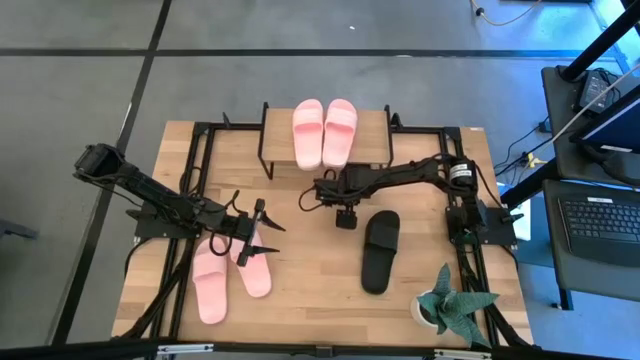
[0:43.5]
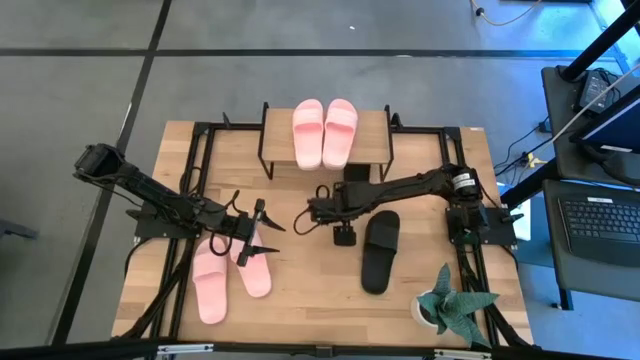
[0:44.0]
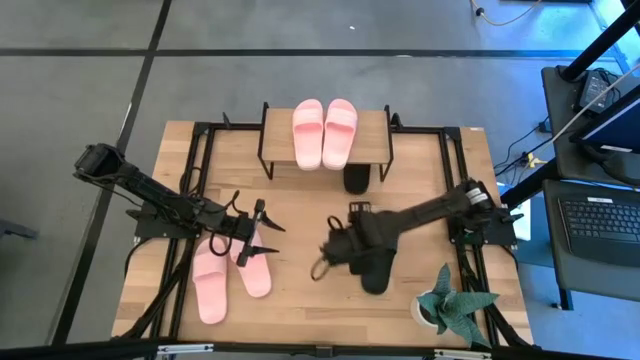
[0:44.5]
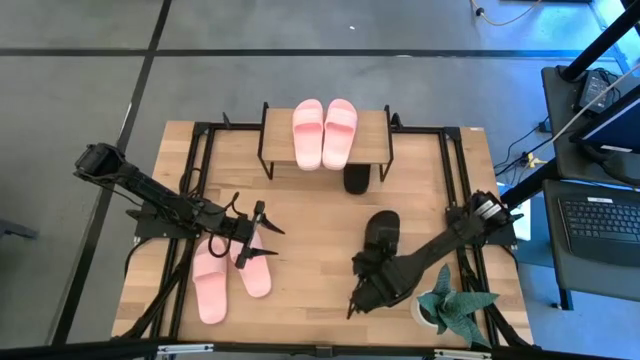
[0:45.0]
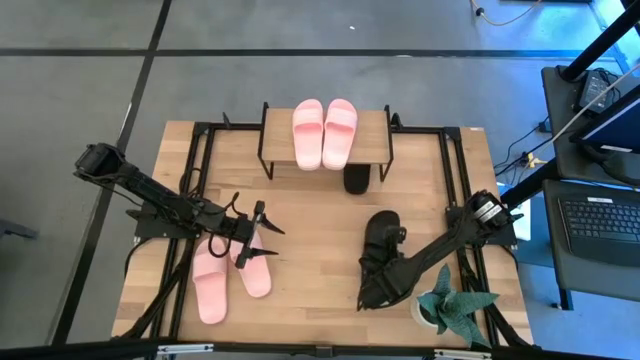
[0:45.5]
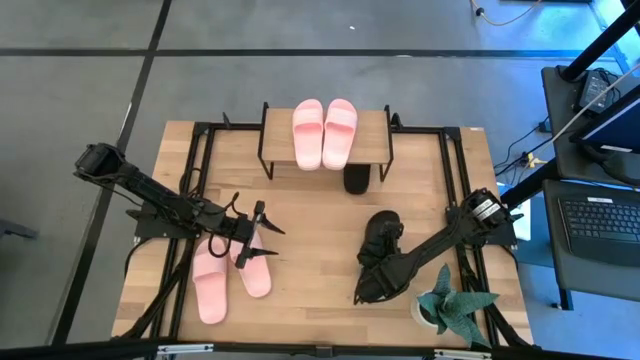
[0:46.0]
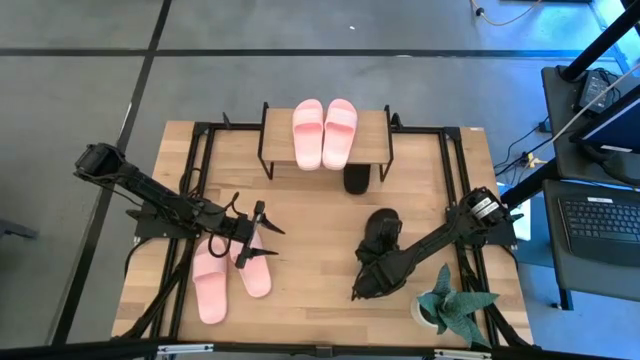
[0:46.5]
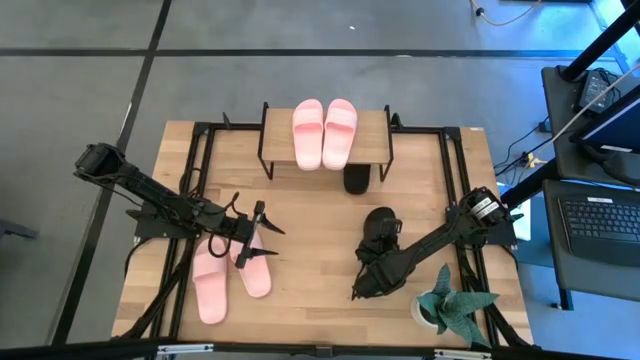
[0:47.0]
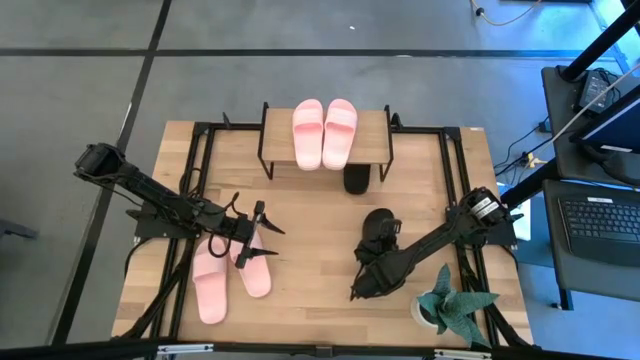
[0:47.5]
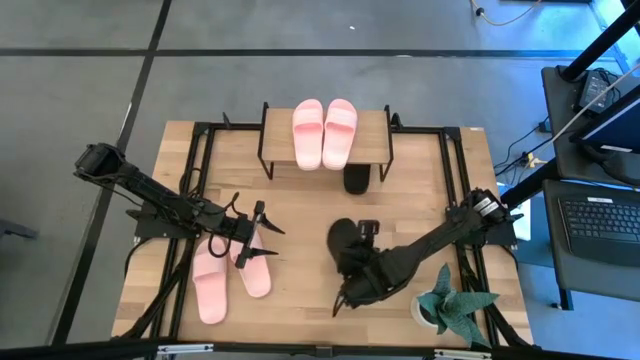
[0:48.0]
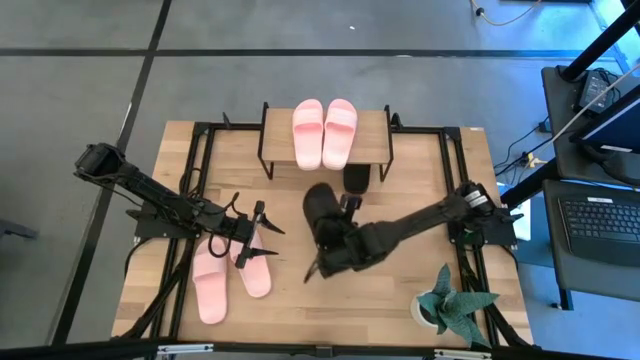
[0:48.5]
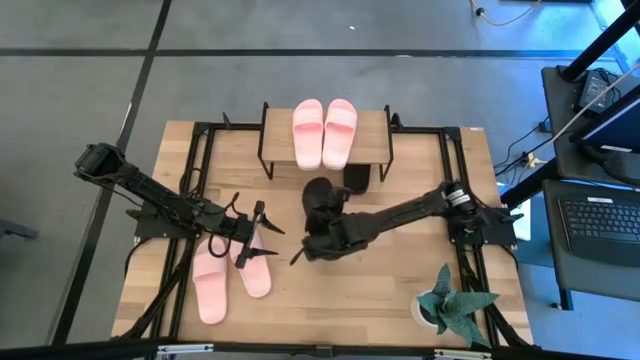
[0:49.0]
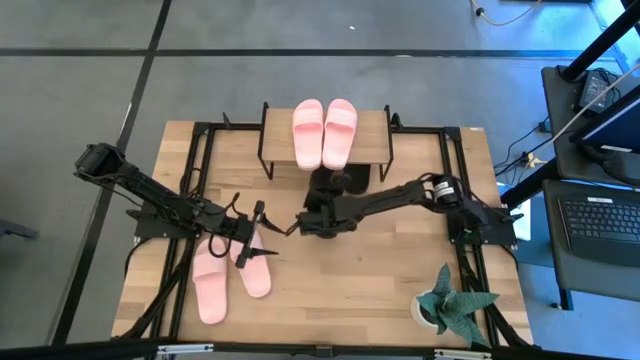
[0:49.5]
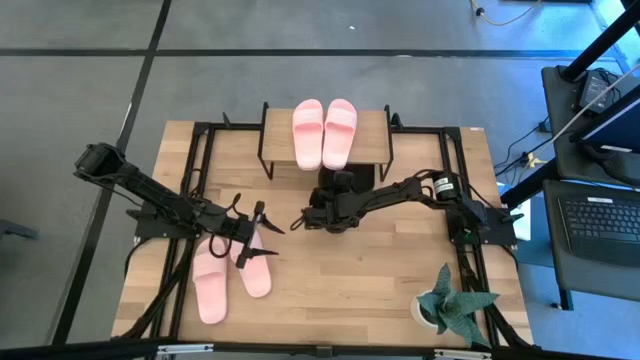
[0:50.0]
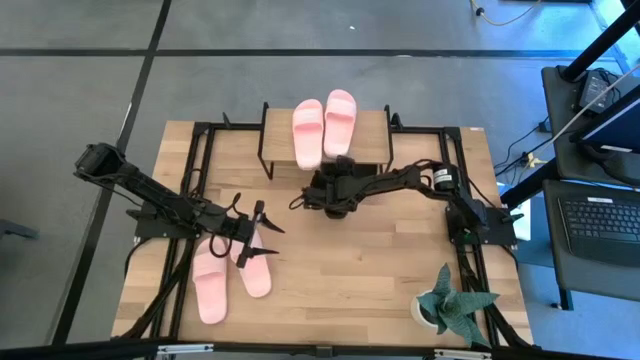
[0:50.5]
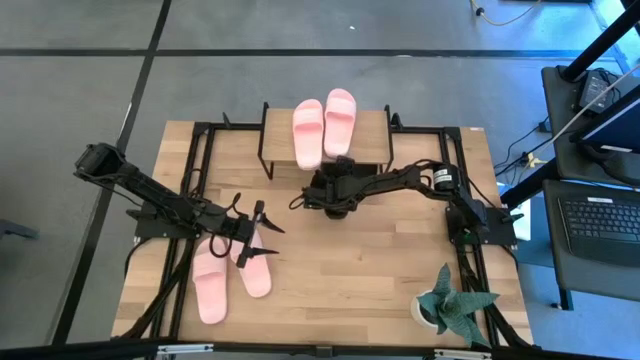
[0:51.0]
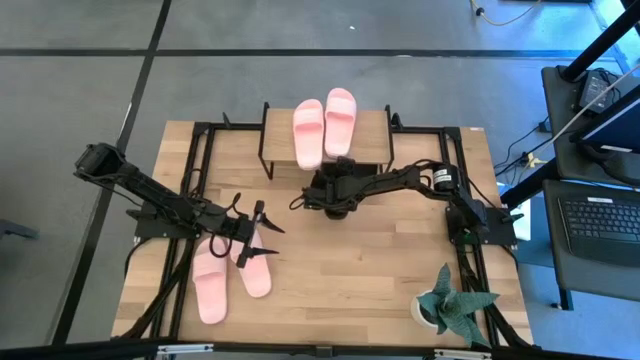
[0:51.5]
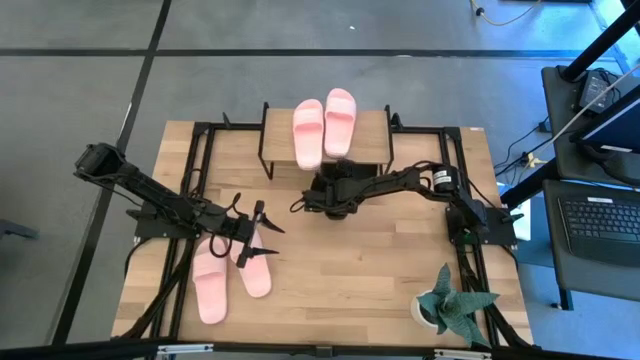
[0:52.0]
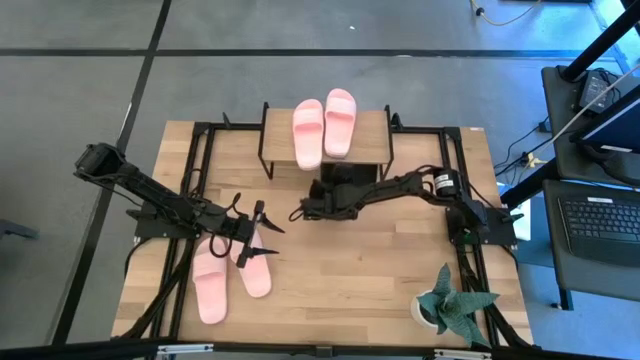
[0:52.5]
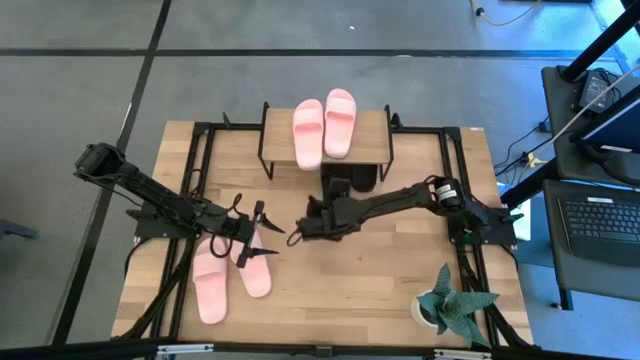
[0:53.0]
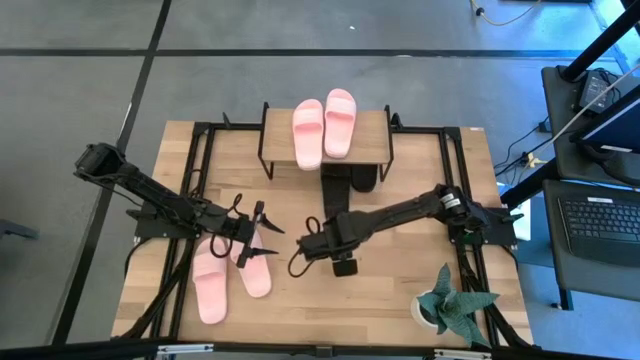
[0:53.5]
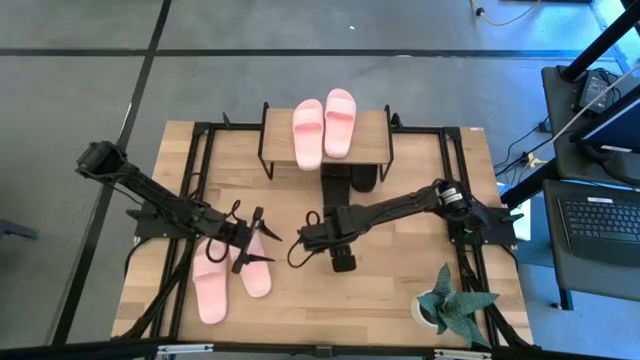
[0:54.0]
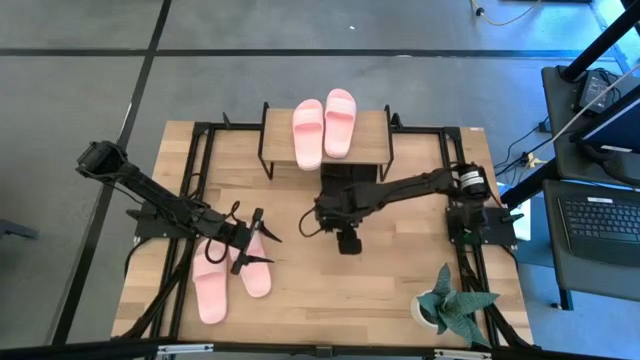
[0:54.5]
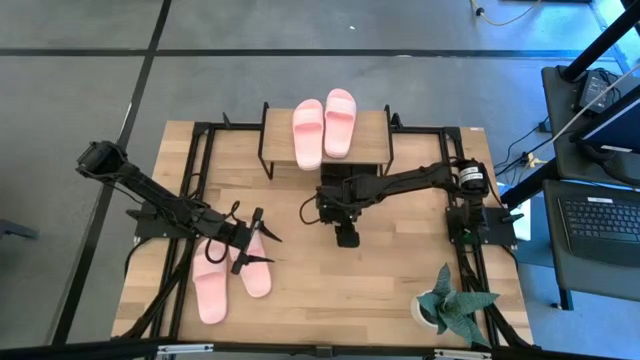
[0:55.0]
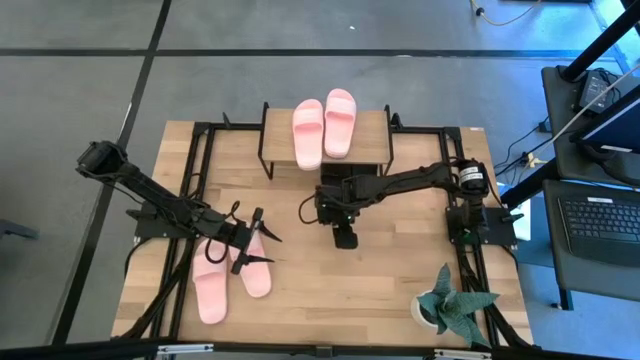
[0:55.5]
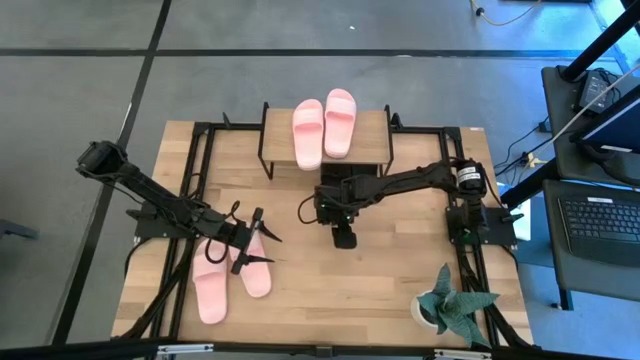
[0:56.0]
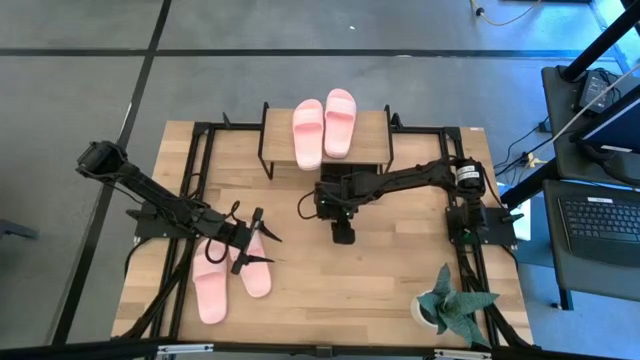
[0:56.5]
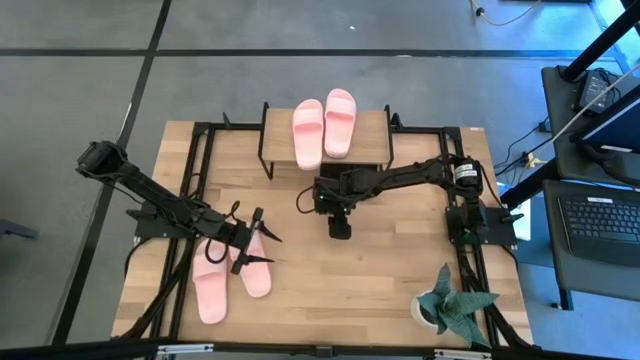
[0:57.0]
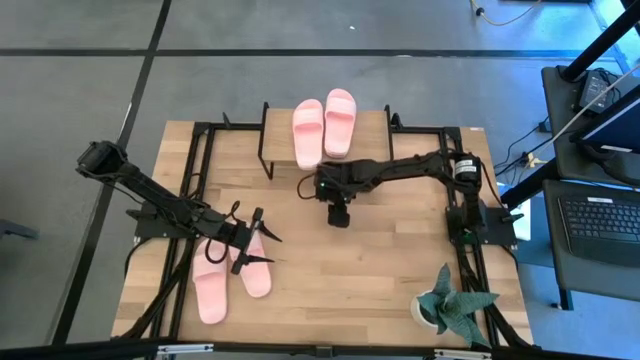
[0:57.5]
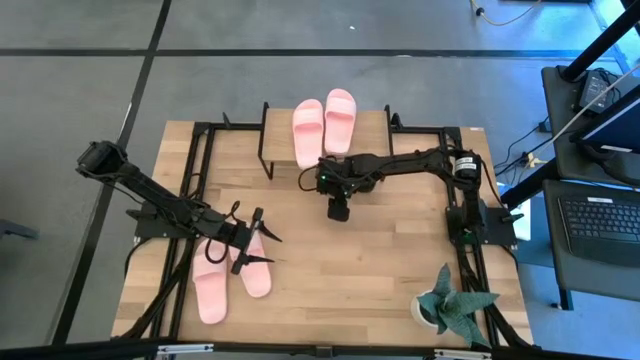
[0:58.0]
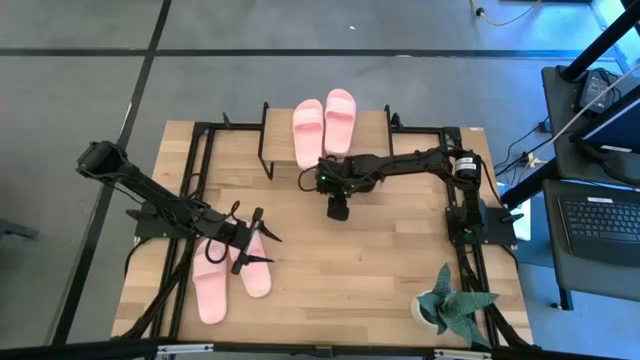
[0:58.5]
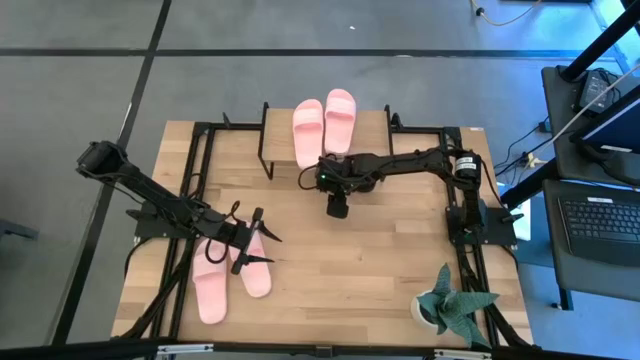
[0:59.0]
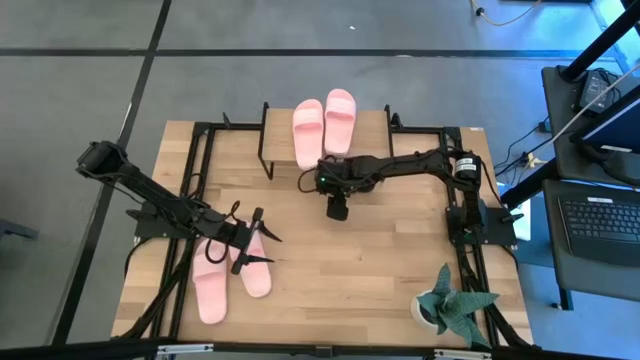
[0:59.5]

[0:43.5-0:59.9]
Task: Pick and place slides into the shelf
Put the black slipper slide under the shelf

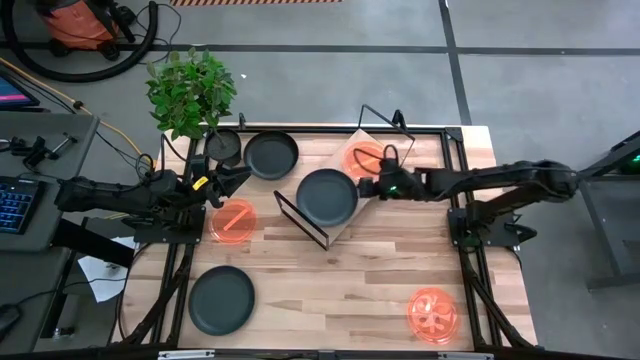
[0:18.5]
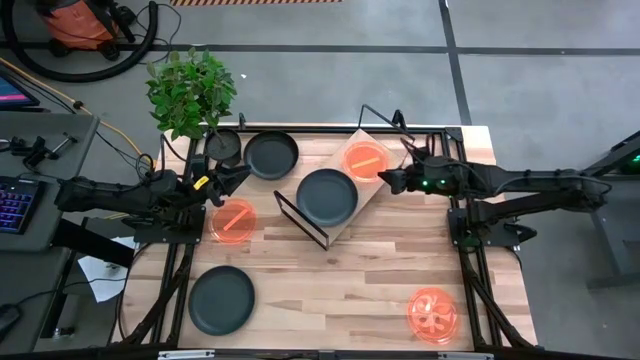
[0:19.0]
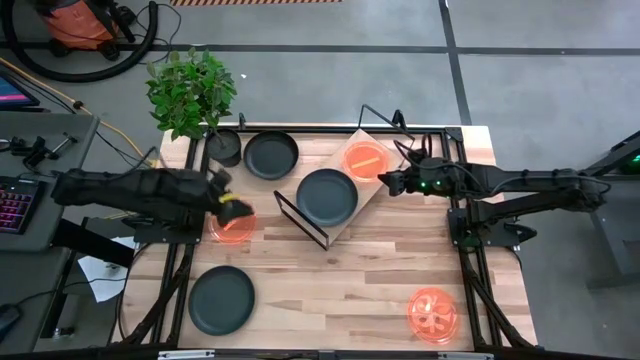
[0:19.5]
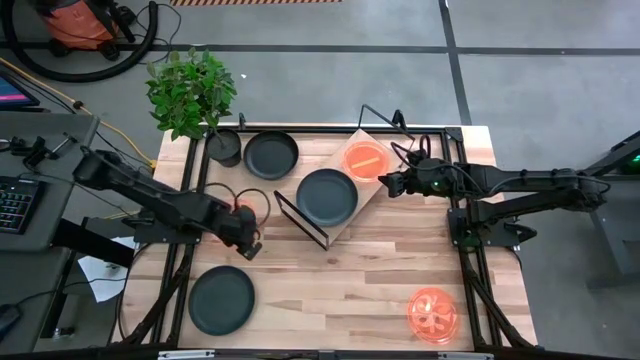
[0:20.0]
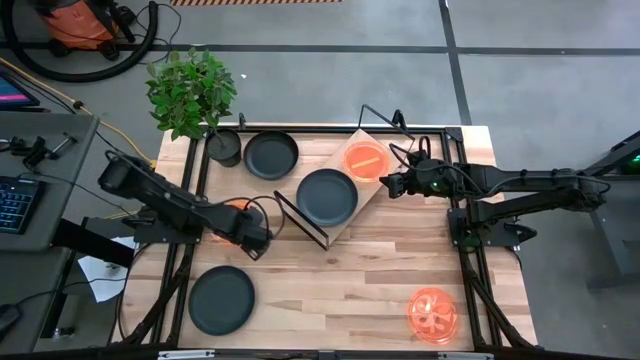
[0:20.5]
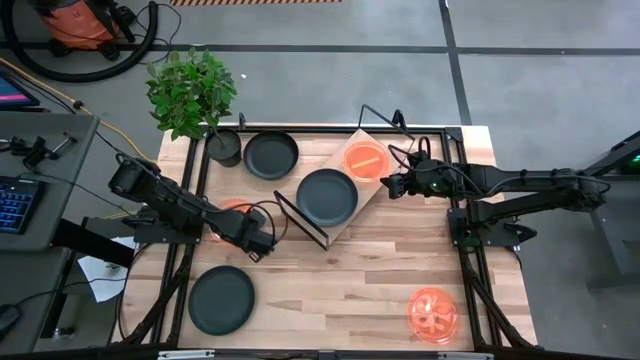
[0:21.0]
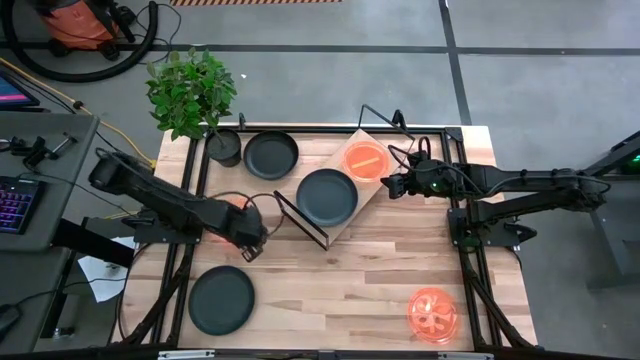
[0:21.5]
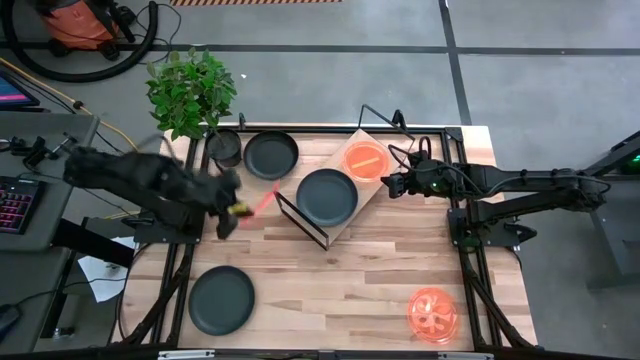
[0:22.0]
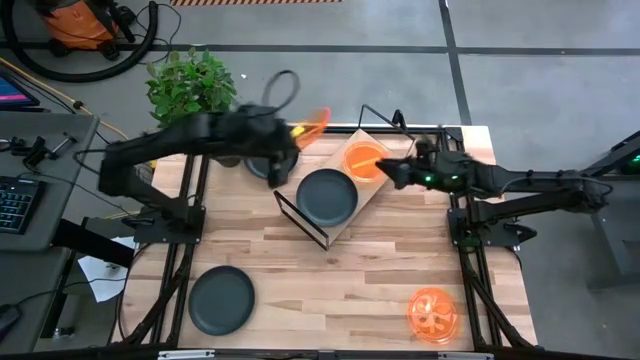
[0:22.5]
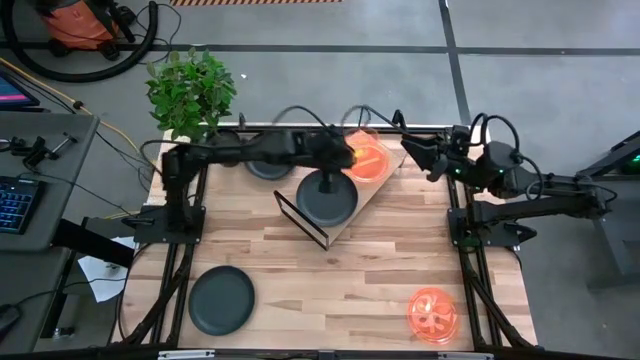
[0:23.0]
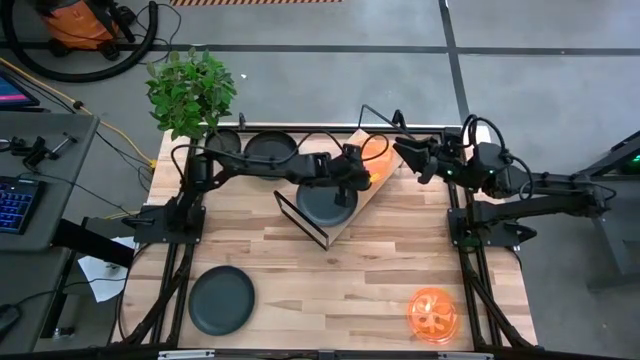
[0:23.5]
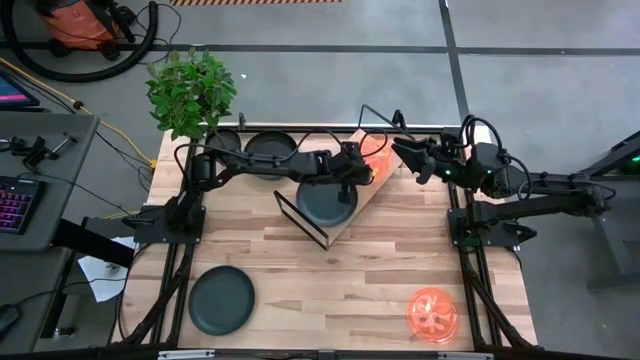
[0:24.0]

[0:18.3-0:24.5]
Task: Place and stack plates onto a shelf
Stack the left orange plate on top of the orange plate on the shelf
